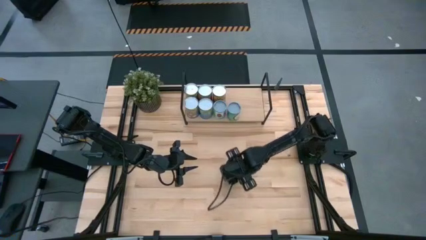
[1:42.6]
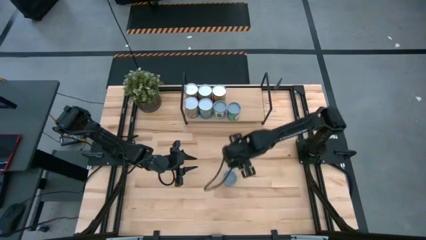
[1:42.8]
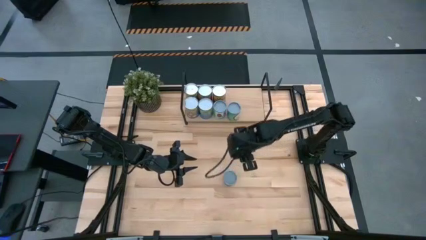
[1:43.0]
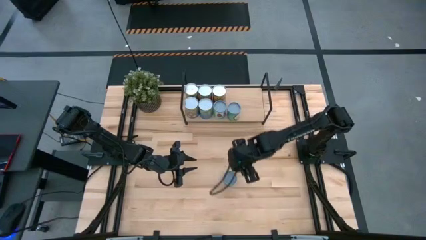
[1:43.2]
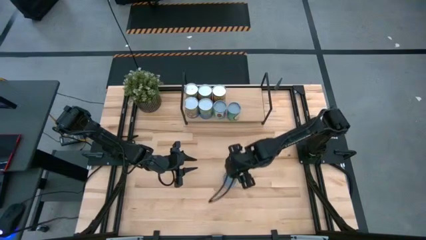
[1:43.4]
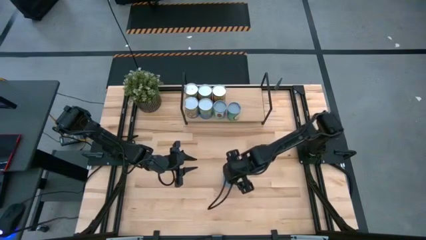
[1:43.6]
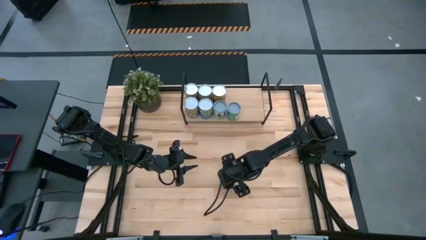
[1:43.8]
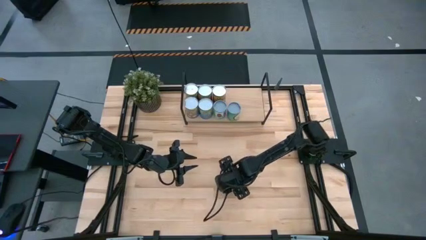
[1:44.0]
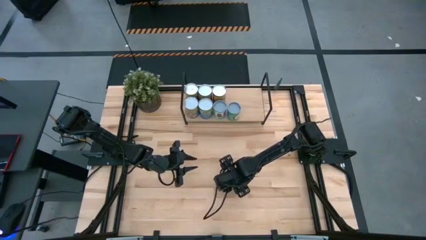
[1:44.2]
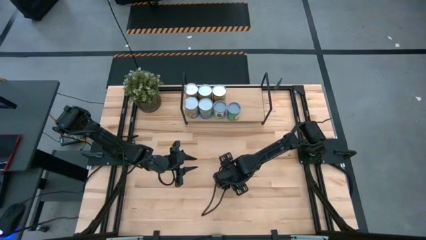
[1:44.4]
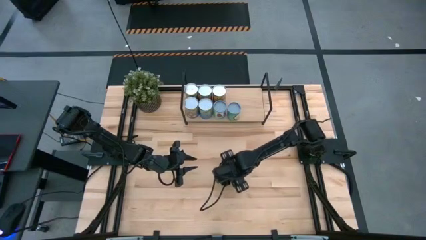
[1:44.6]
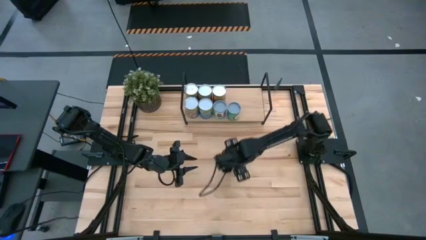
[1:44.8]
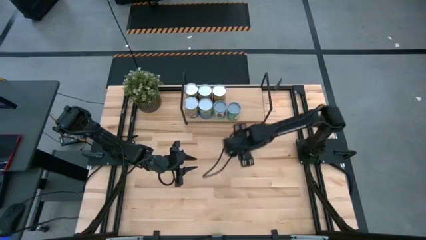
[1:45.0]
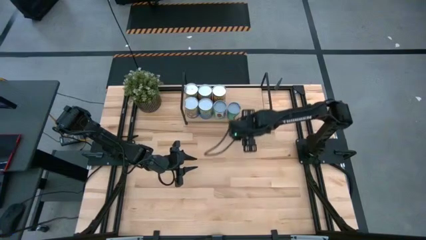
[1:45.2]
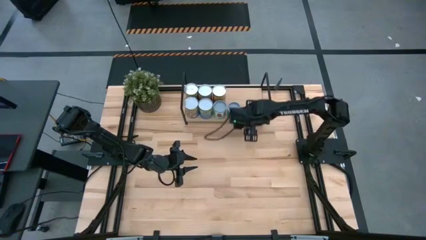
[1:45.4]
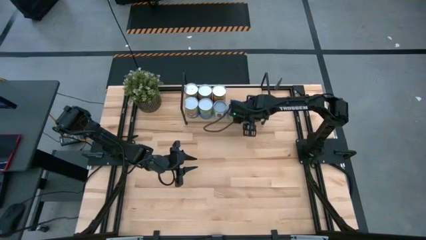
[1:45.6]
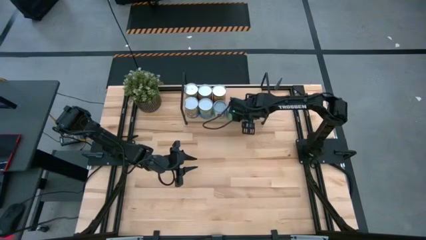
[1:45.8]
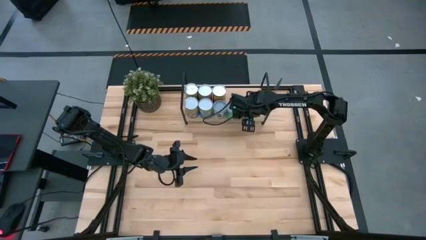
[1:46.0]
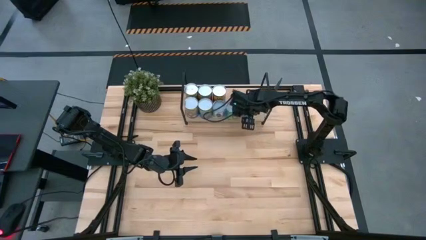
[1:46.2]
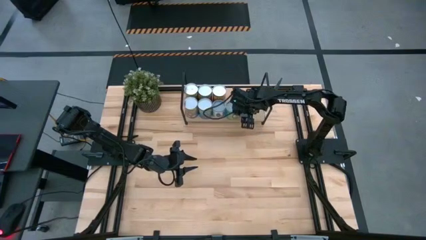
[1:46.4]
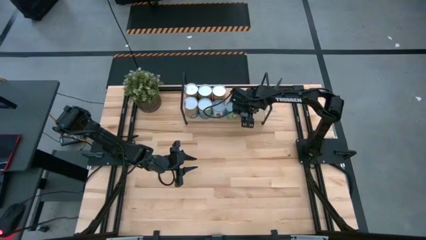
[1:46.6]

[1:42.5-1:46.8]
Task: Pick and place cans onto a shelf
Put the canned tuna on the shelf

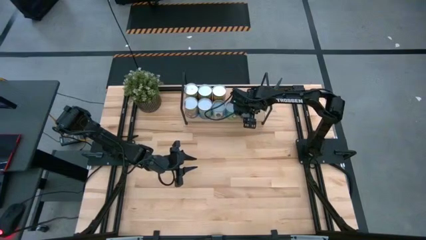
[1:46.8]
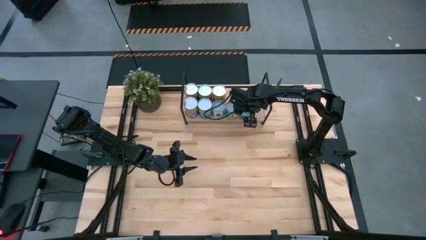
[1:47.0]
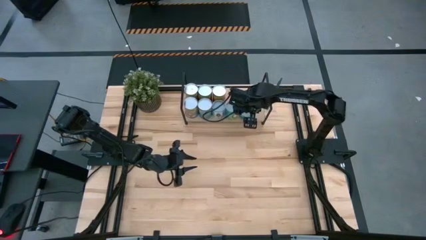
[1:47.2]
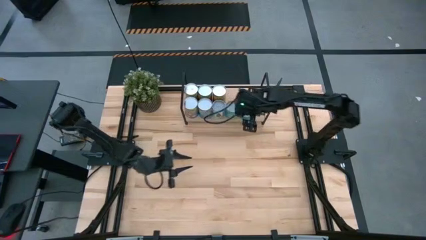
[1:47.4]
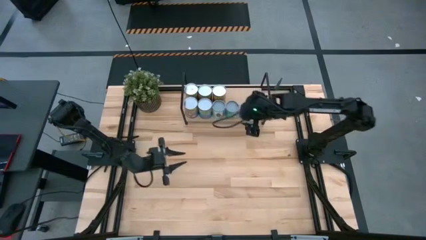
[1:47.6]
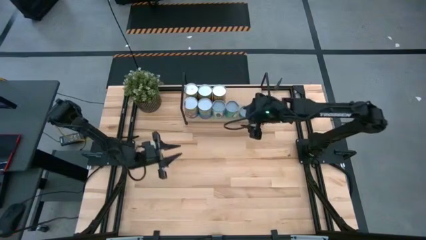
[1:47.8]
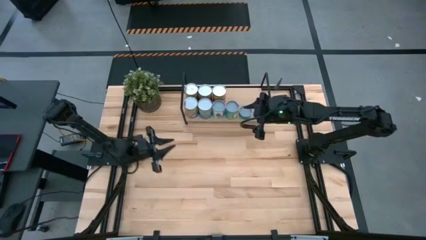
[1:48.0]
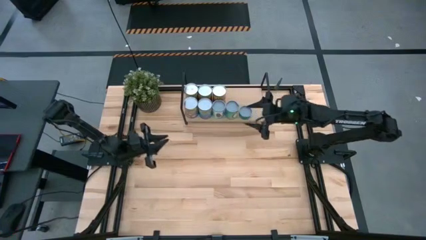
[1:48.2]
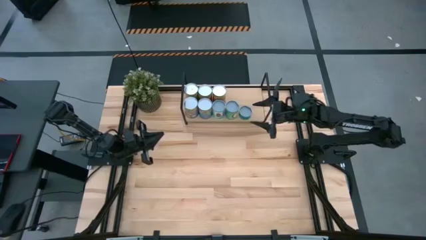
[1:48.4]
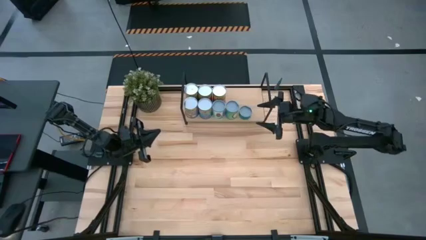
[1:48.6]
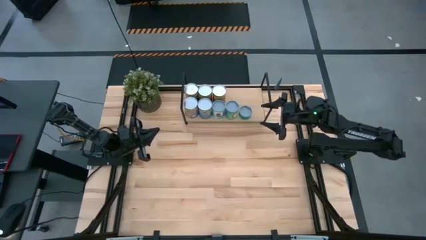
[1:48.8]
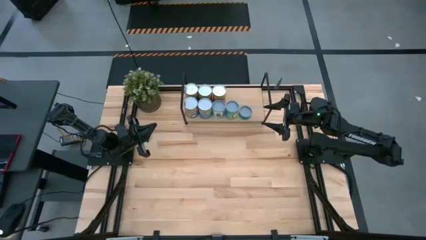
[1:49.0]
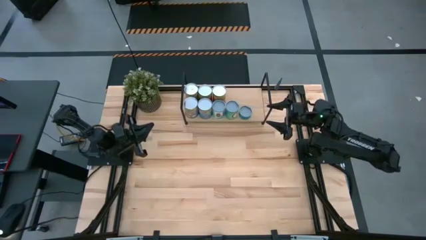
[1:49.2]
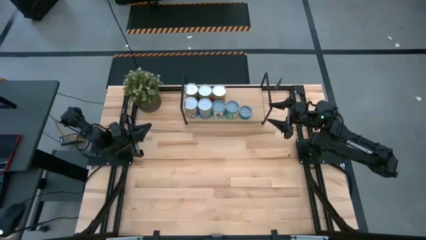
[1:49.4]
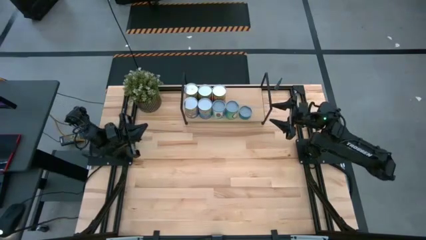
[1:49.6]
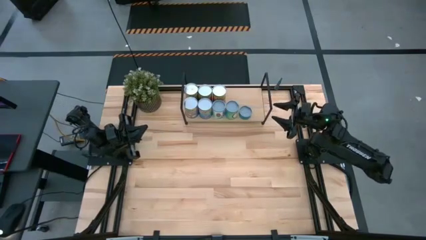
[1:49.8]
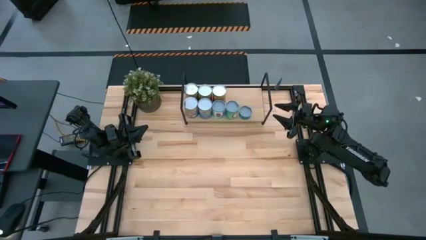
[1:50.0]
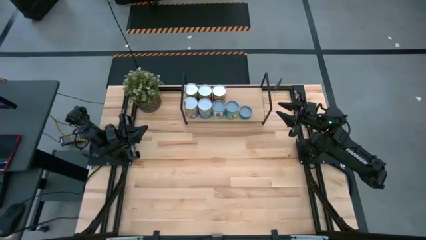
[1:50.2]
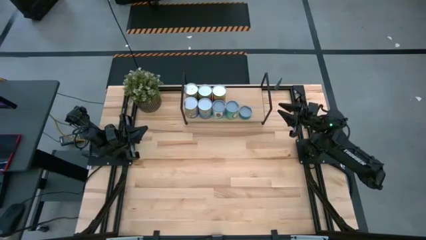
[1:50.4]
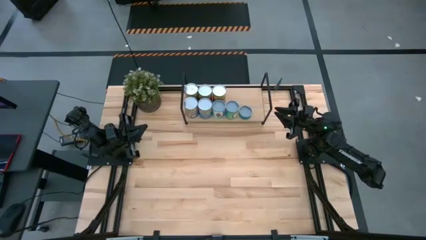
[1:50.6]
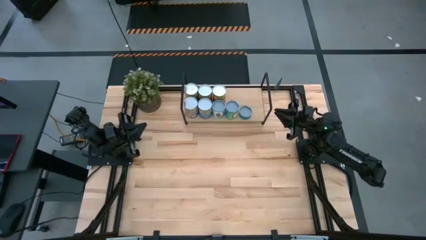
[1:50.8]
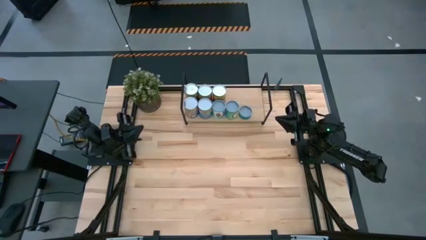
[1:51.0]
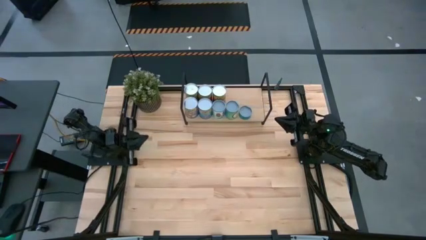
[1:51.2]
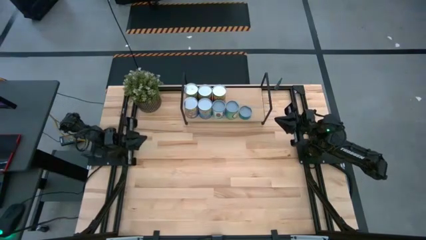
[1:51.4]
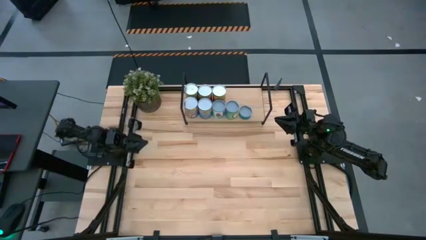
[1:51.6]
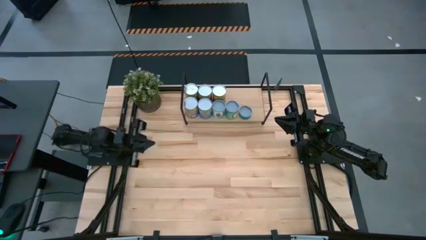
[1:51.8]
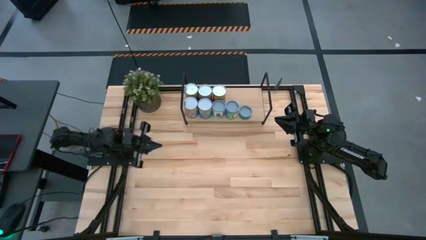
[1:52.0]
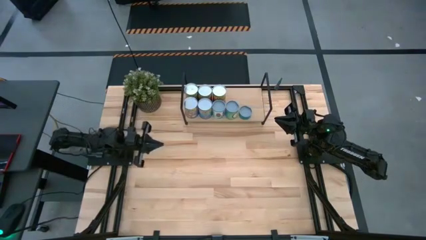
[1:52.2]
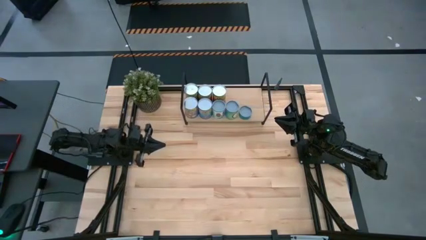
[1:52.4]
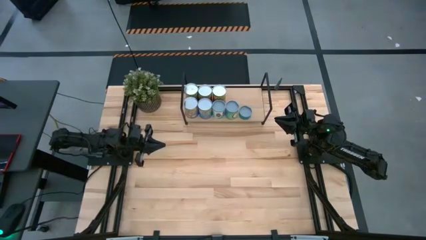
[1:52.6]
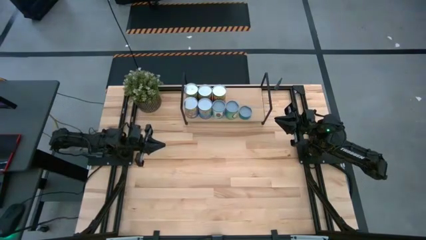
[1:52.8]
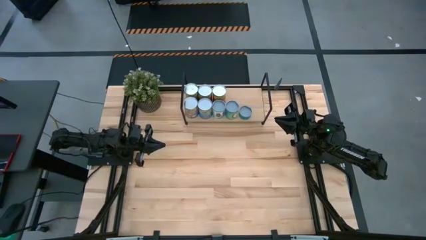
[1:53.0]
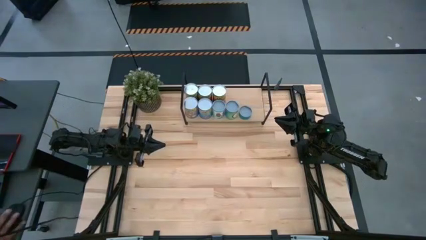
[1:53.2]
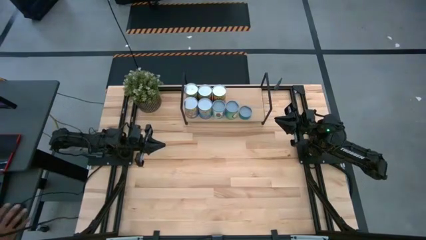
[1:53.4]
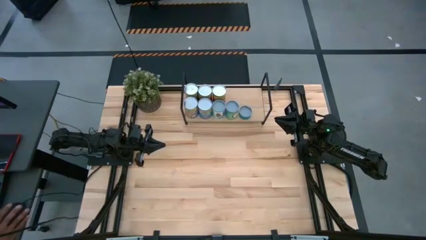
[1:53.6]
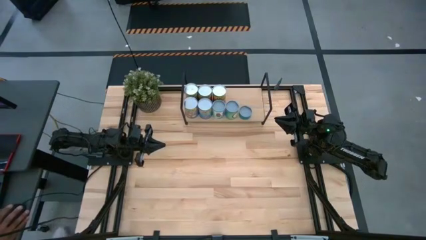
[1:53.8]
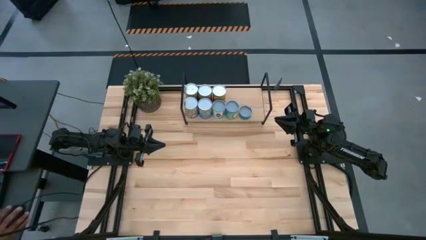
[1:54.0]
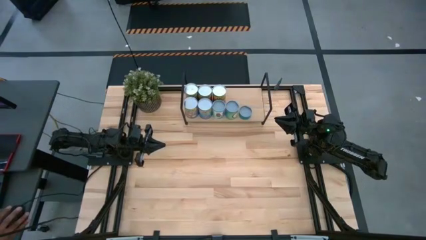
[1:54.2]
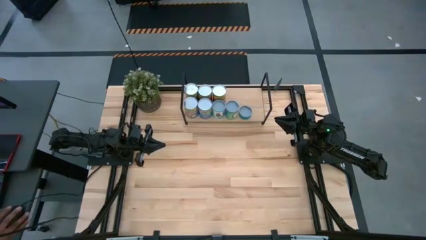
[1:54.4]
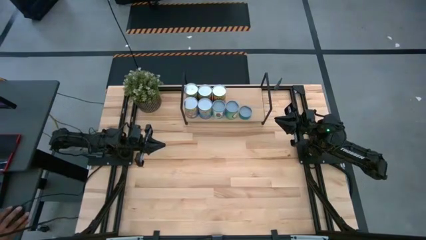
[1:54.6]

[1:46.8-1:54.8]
Return to Home Position

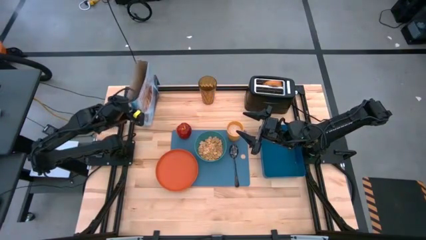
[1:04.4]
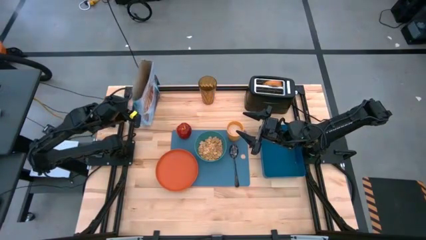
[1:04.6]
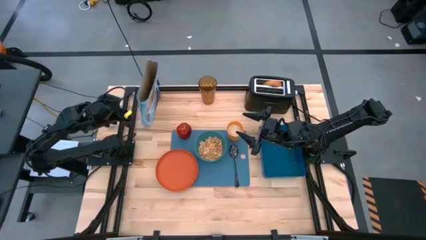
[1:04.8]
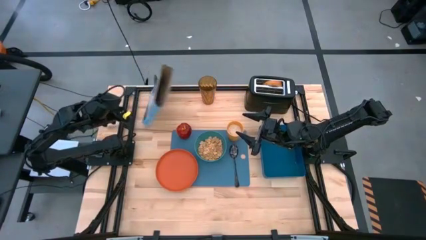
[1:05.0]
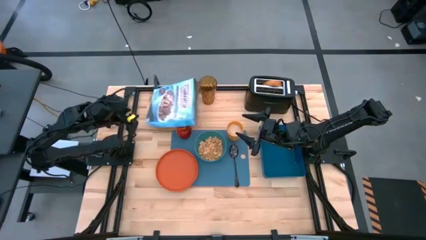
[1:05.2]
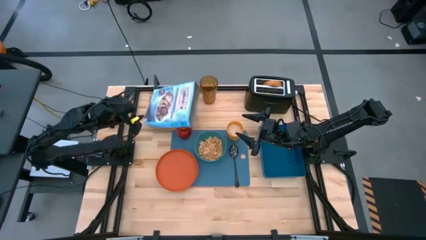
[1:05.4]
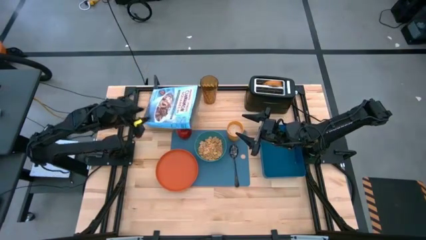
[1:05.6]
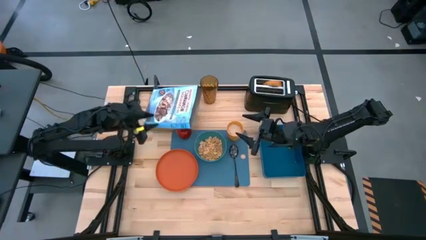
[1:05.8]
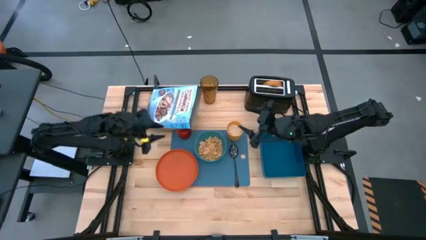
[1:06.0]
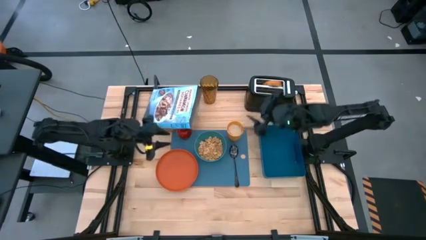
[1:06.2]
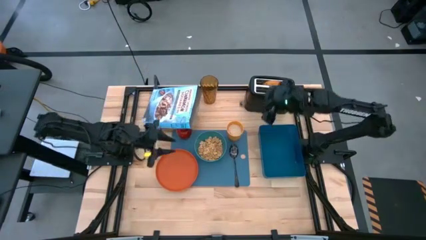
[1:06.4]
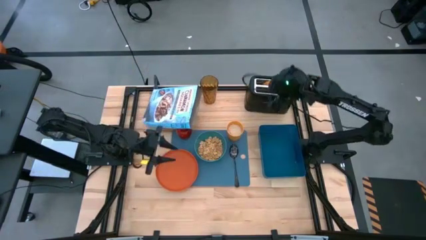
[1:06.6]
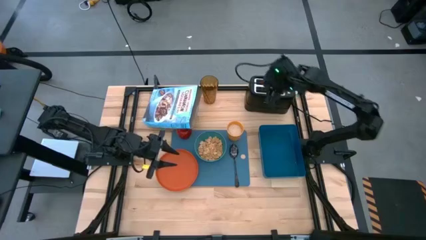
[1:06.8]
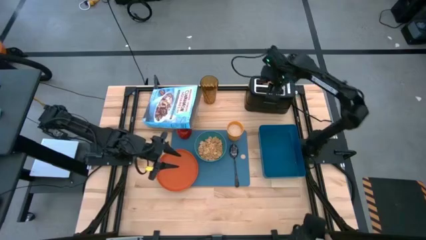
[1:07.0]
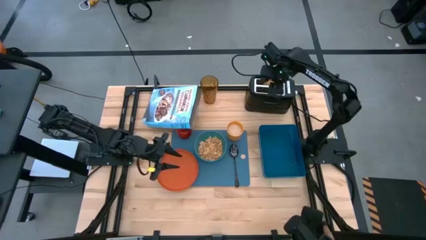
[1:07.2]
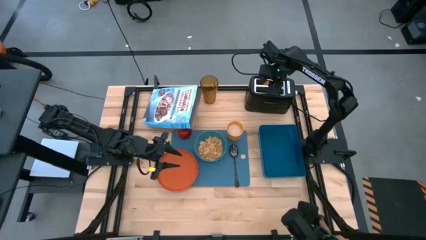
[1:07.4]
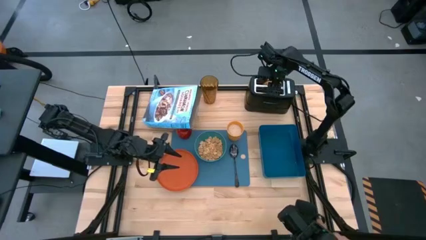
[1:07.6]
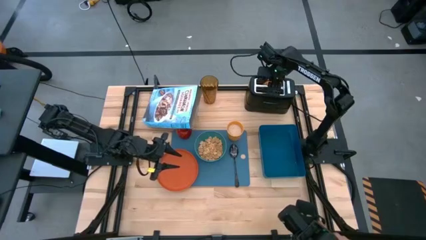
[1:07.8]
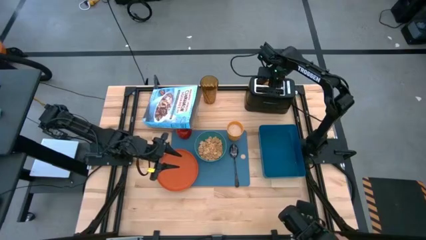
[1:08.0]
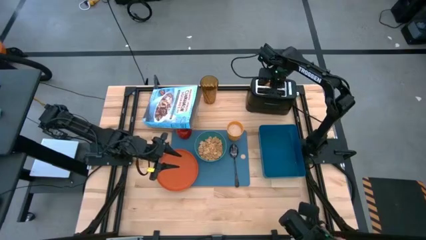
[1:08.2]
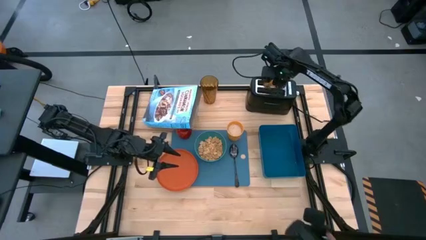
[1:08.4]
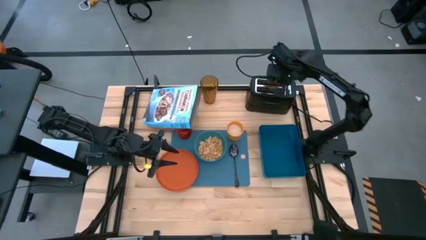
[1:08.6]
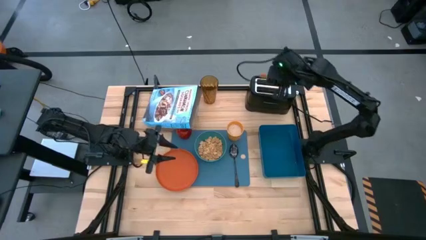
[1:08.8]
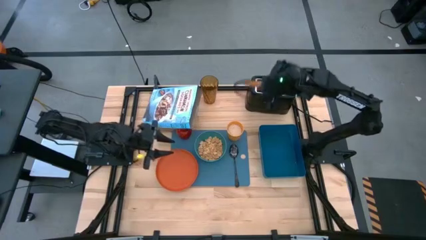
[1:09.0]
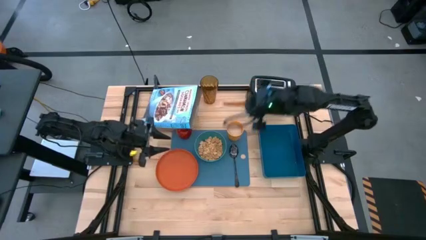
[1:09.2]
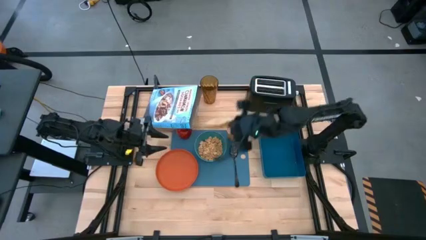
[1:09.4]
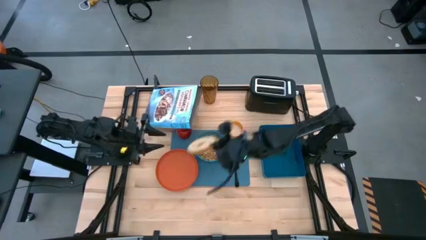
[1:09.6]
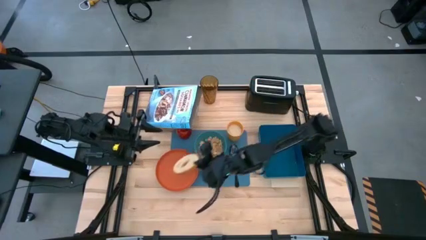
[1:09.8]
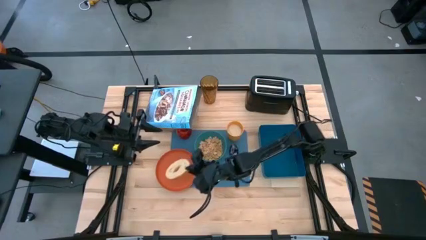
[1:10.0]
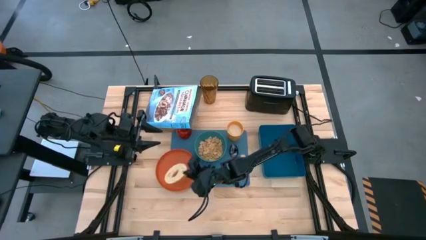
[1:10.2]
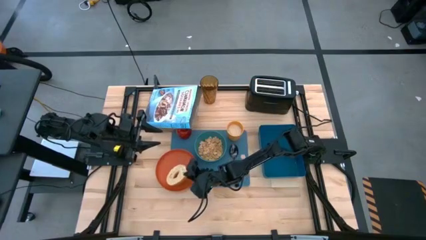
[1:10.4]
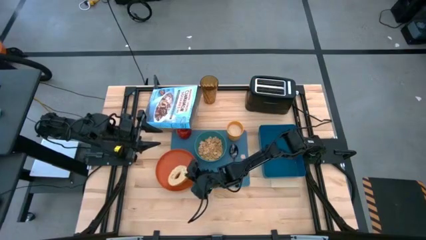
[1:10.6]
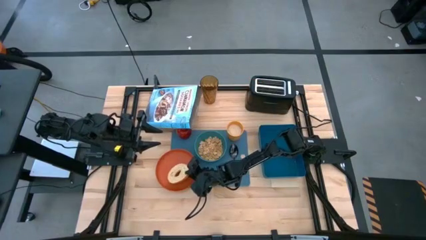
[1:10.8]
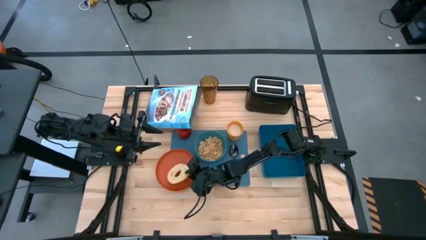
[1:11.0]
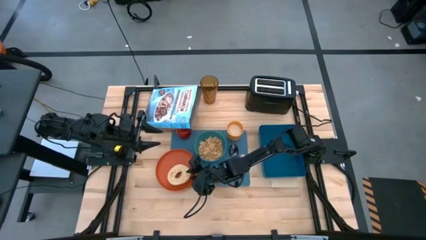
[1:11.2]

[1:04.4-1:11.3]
Task: Arrange a breakfast setting
Put the bagel on the orange plate
